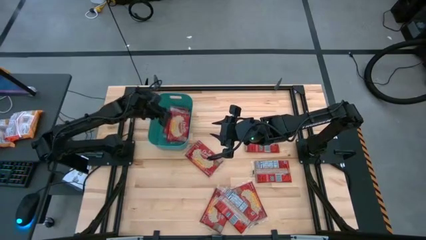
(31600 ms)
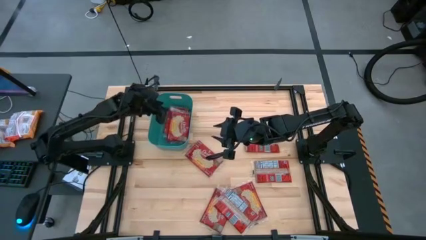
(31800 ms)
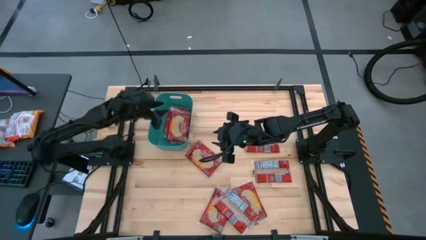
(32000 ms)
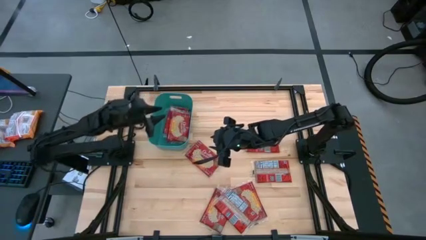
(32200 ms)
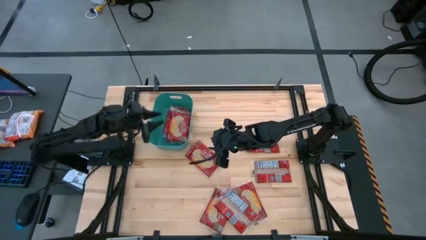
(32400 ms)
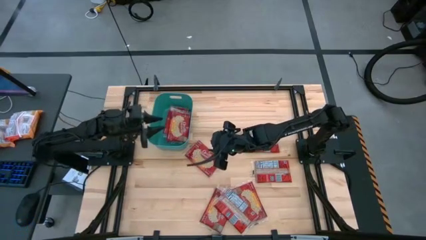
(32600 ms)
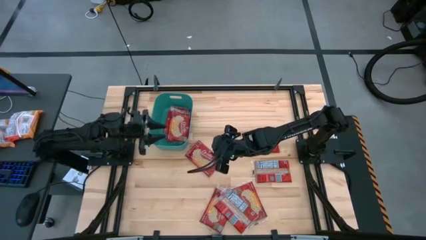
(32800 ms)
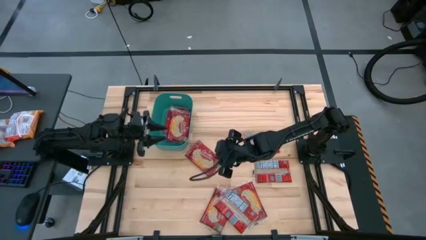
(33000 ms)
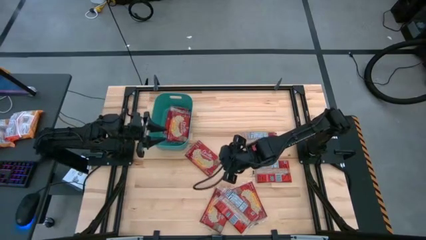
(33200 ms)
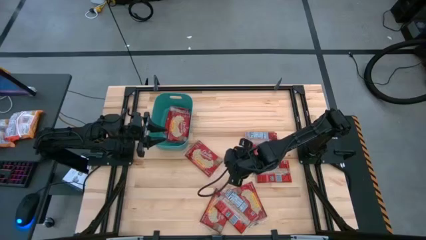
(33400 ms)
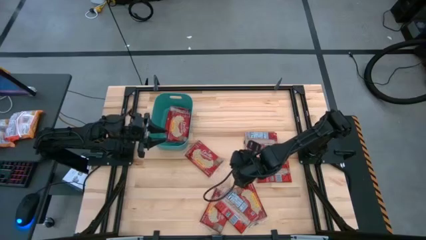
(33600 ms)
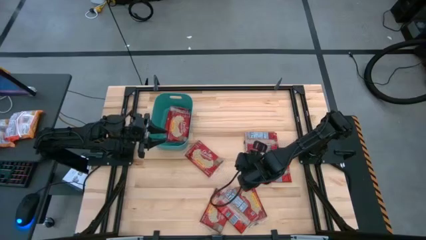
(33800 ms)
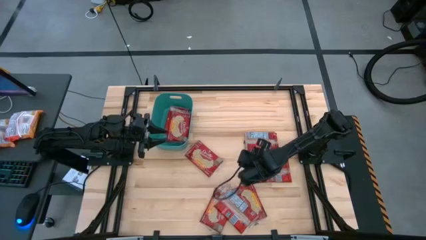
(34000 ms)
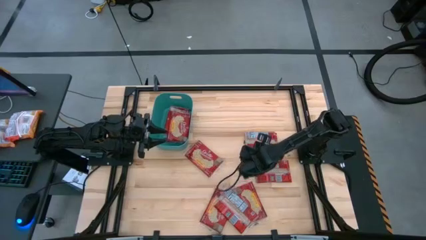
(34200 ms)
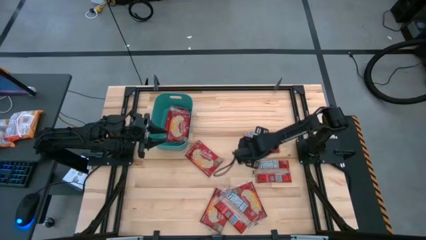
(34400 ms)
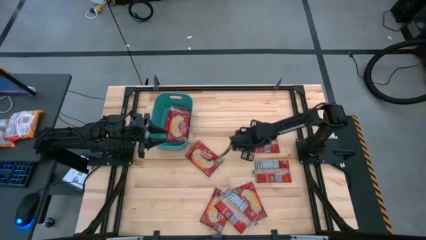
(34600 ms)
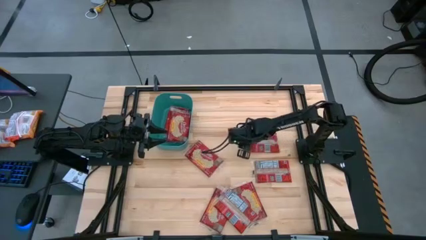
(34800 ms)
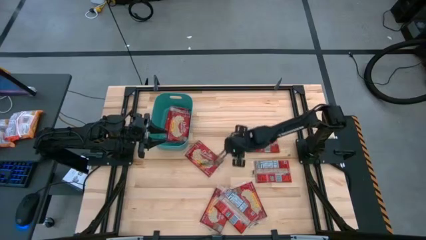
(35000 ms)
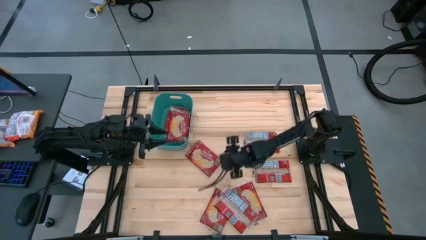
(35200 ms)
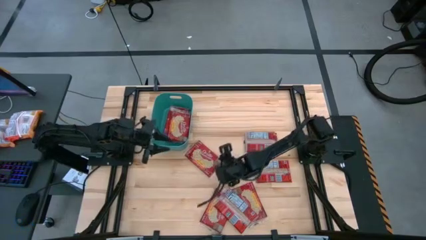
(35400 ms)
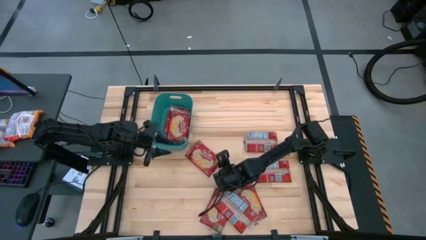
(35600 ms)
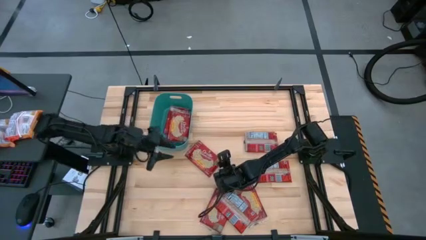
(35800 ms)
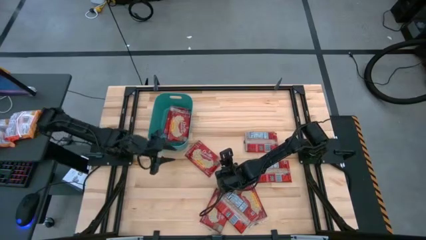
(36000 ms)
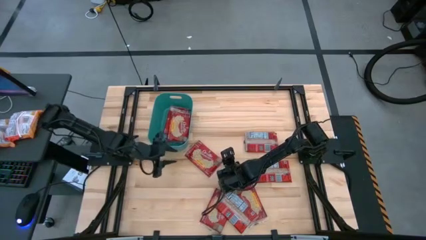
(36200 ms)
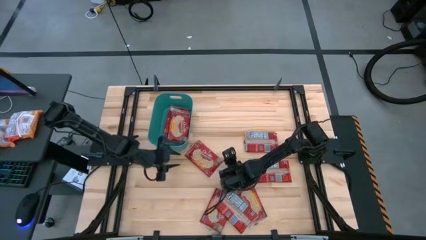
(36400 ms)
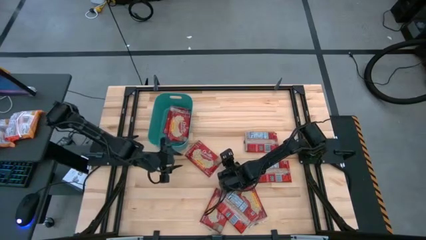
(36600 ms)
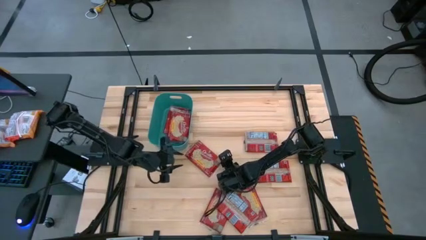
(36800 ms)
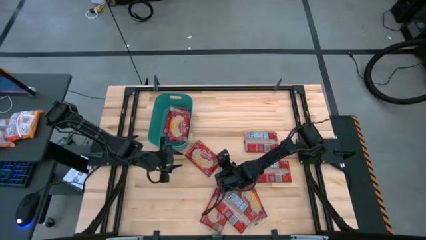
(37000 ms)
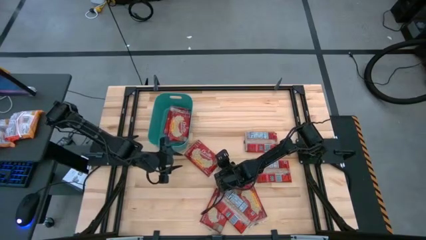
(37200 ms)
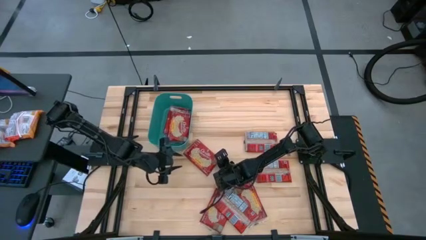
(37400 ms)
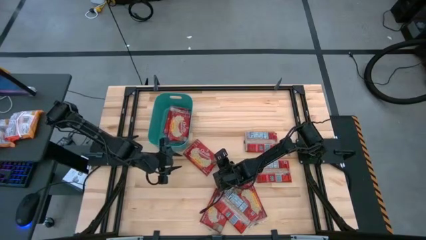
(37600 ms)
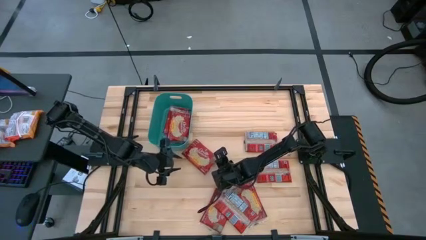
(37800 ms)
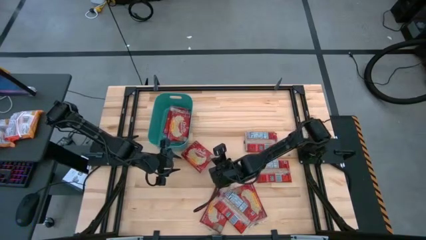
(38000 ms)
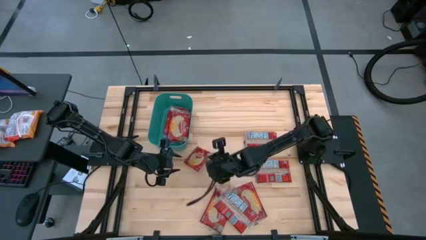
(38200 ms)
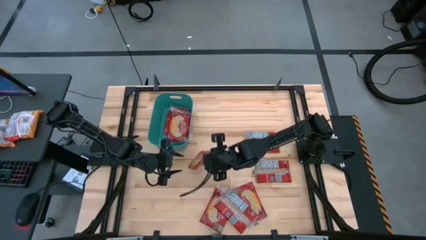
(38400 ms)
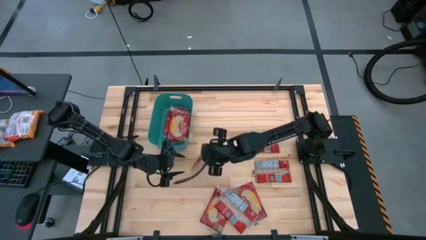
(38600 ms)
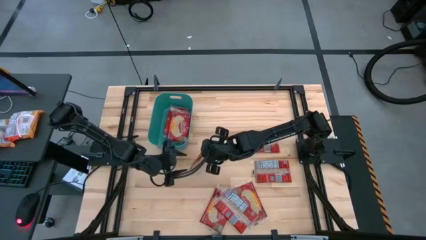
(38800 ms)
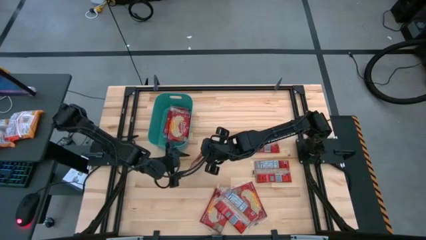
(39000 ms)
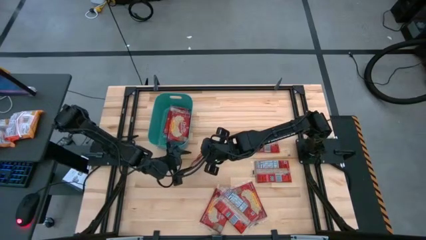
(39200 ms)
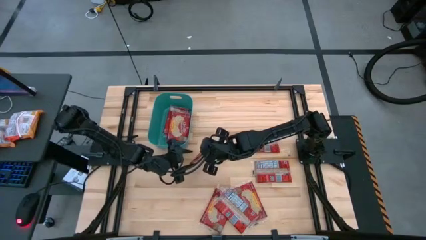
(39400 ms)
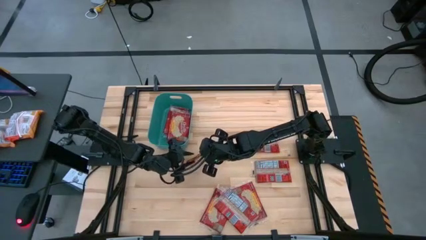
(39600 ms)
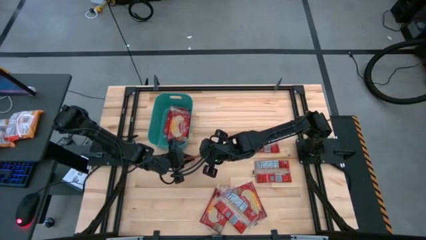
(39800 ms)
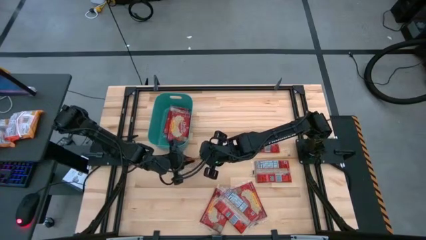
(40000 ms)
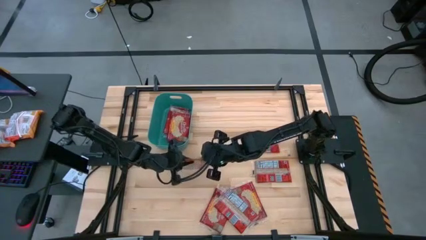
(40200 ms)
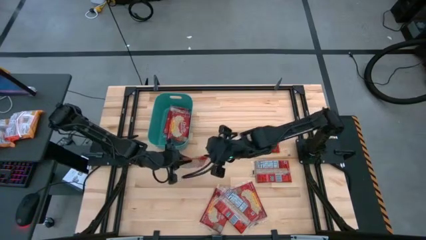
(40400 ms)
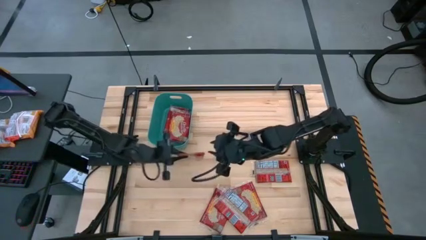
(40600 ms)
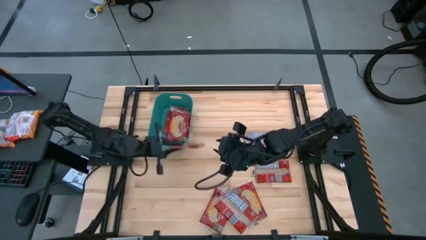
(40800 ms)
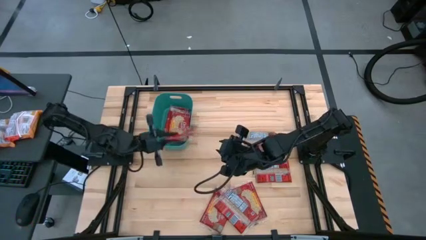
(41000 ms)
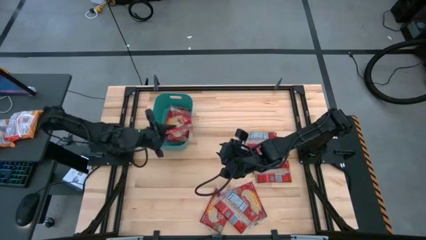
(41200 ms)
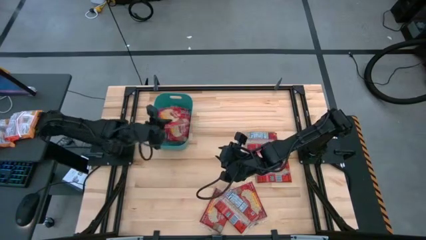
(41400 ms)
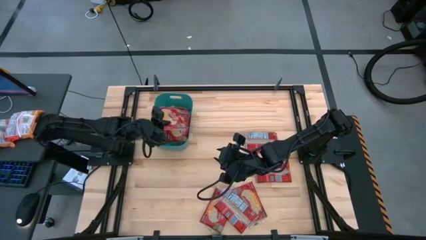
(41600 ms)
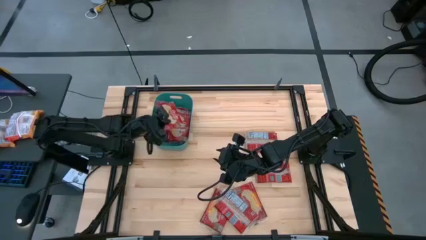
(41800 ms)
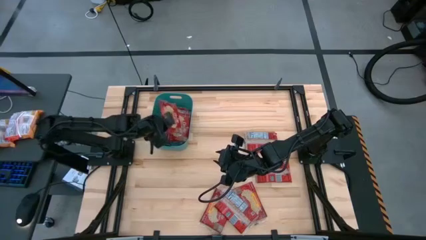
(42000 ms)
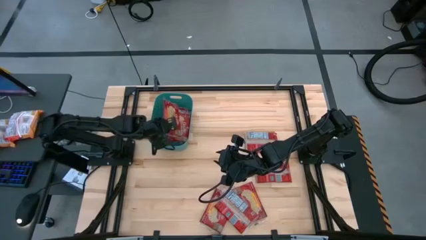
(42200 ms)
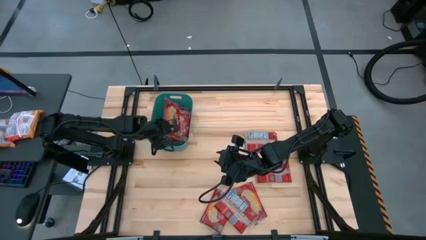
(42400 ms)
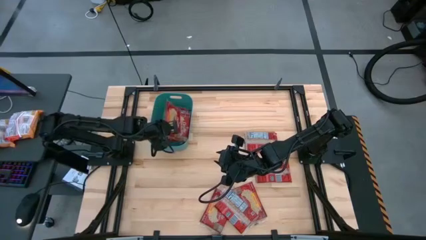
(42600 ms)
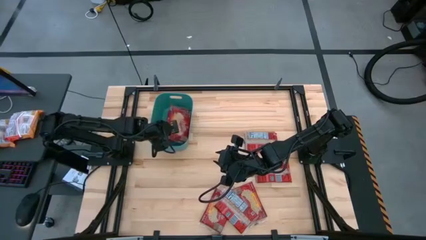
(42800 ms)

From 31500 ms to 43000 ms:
Task: Sort popcorn bags into baskets
Put the red popcorn bag into the green bin

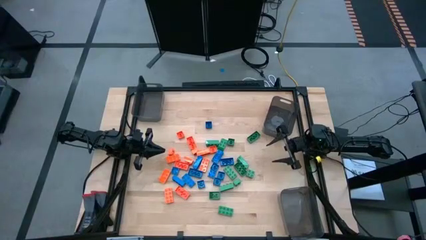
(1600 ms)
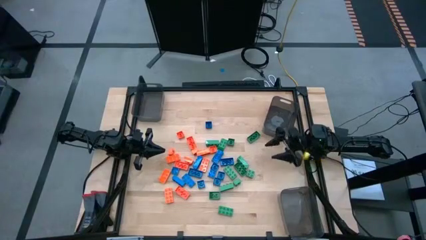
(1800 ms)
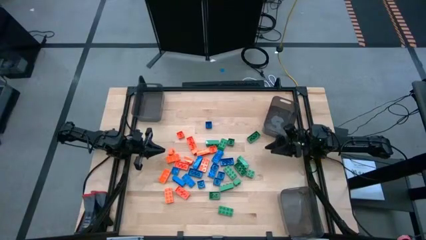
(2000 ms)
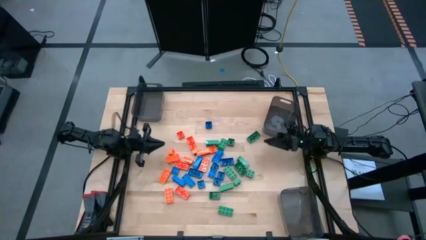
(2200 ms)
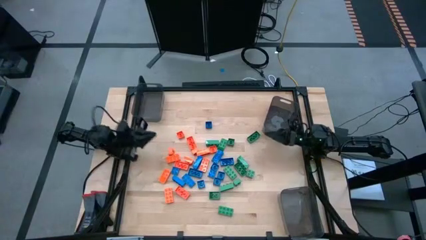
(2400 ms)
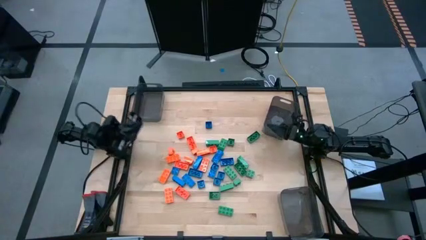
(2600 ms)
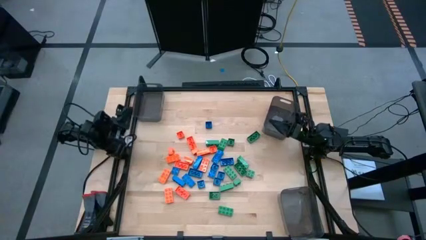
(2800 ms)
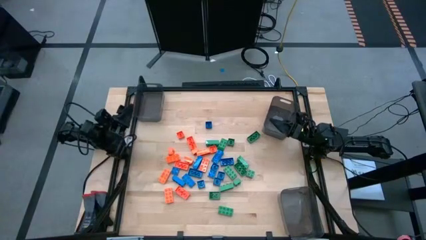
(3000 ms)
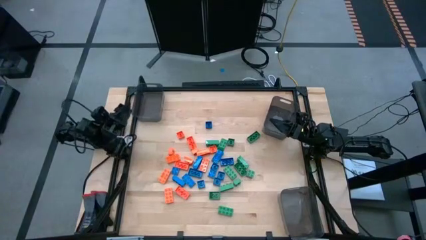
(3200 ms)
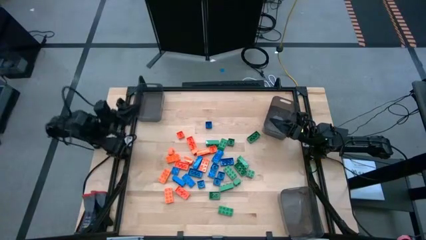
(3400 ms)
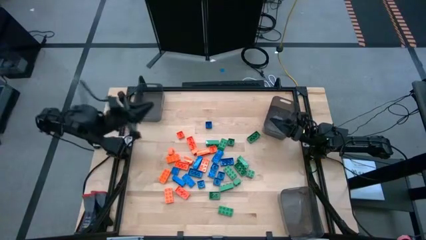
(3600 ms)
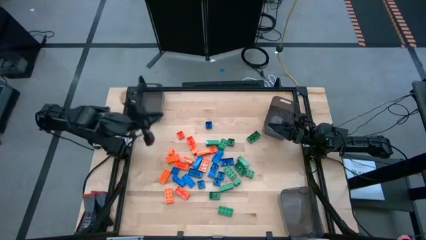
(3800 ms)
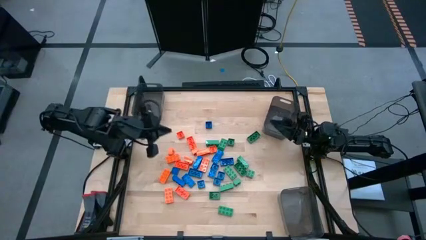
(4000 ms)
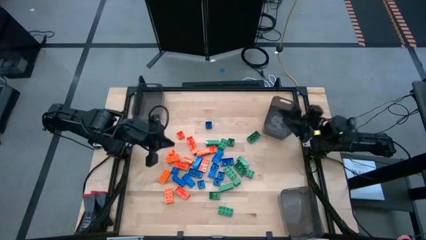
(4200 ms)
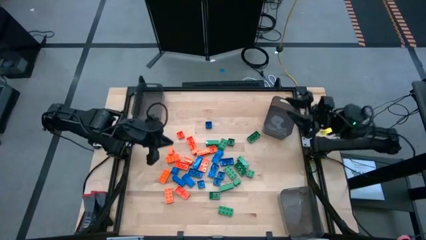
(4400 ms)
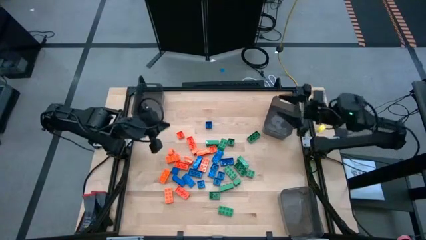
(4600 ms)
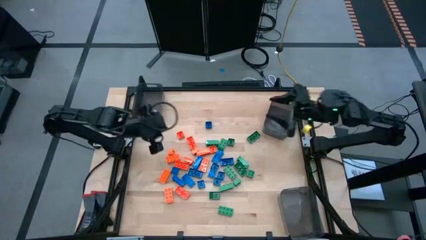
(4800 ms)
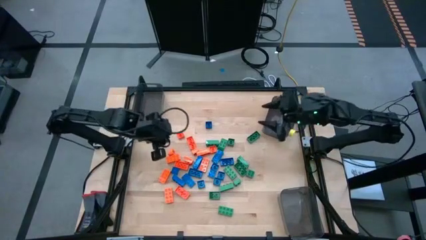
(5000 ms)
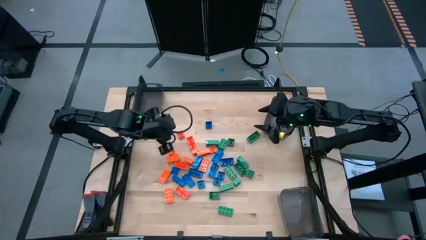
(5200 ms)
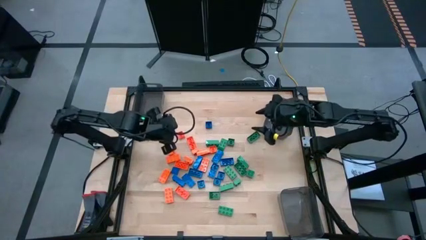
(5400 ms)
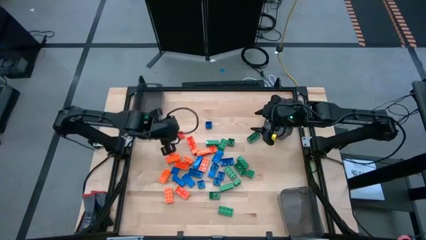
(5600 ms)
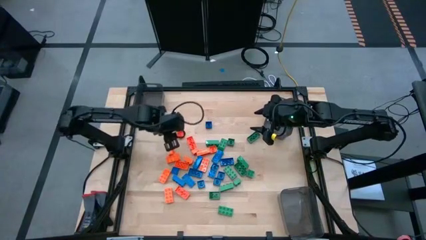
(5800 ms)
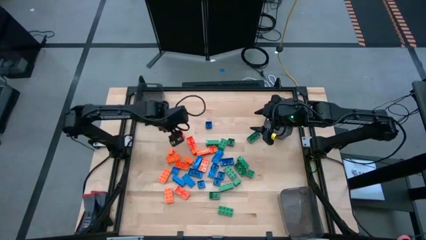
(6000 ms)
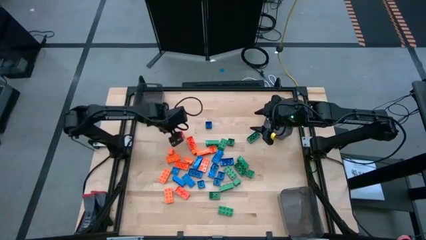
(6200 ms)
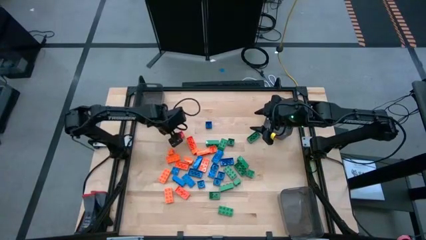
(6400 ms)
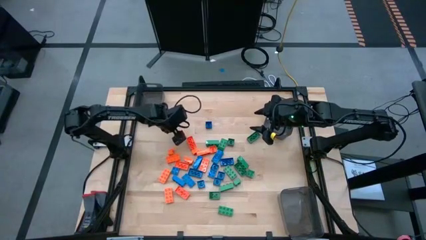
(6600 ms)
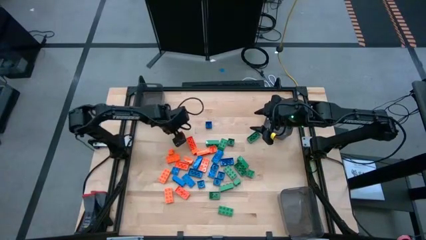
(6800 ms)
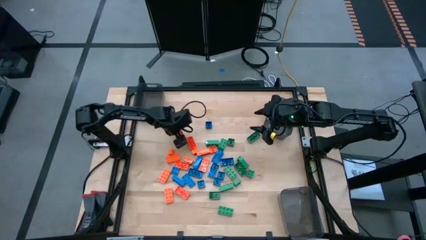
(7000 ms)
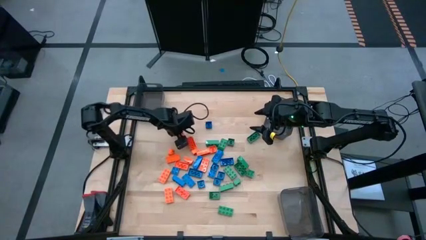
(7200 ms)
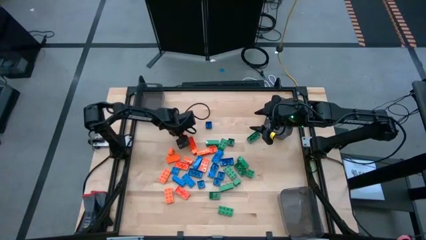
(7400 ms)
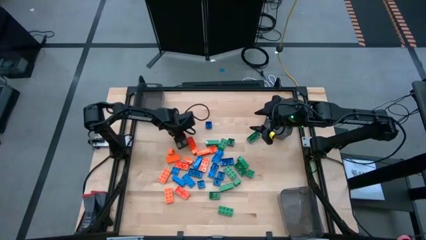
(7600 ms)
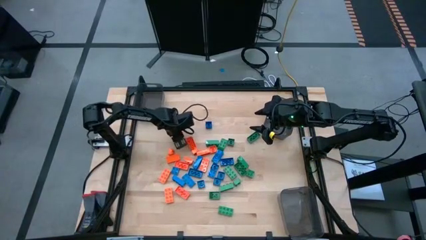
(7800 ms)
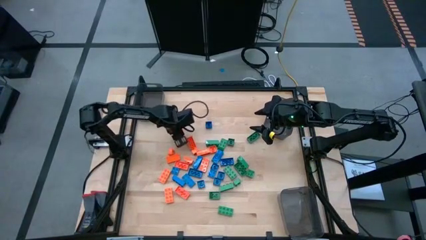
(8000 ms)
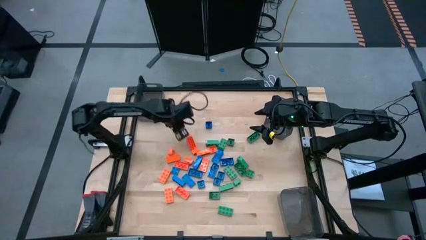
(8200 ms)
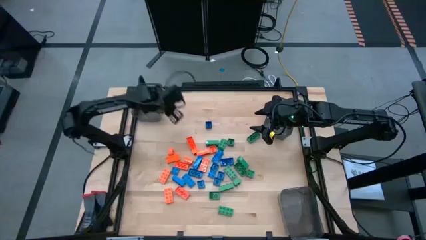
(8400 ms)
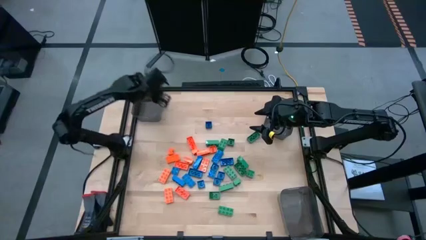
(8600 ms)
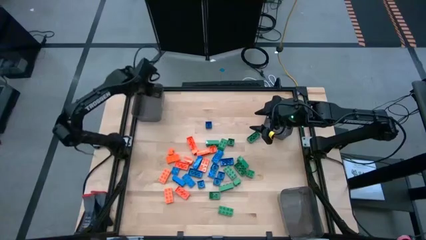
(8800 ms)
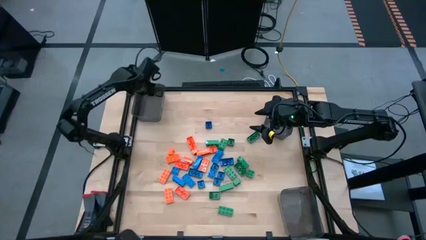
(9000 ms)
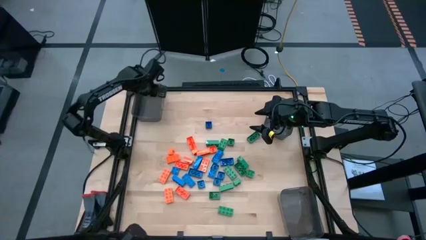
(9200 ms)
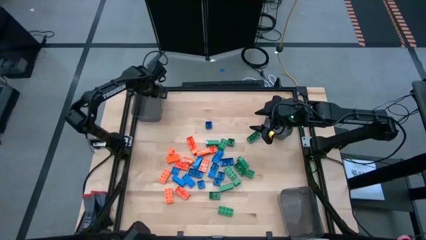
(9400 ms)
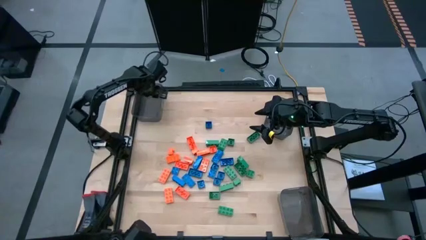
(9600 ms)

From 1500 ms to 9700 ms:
Task: Sort blocks
Put the orange game piece into the top left black bin
